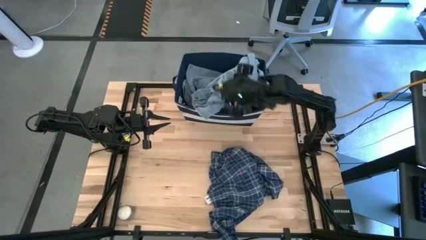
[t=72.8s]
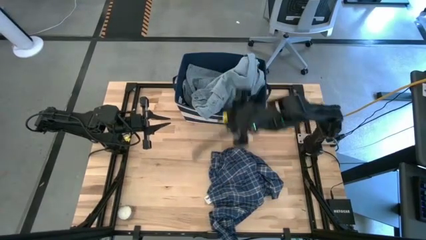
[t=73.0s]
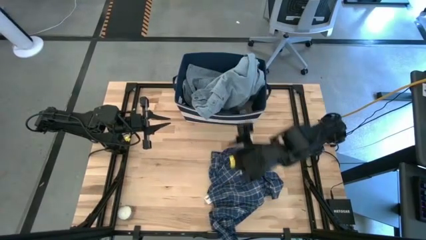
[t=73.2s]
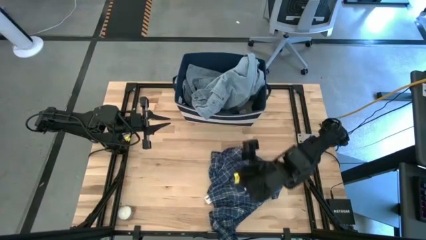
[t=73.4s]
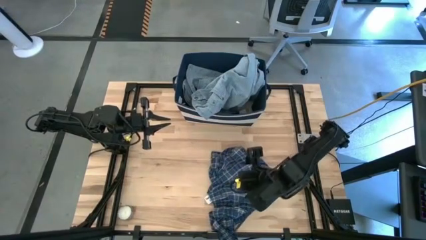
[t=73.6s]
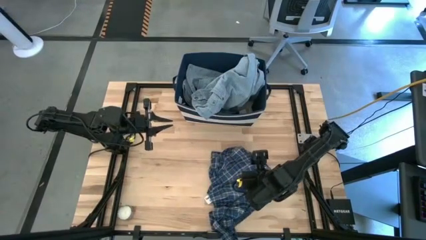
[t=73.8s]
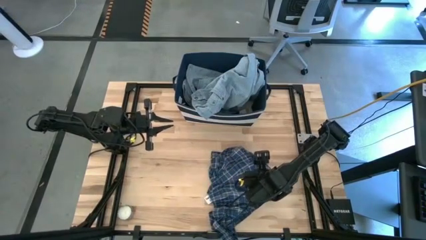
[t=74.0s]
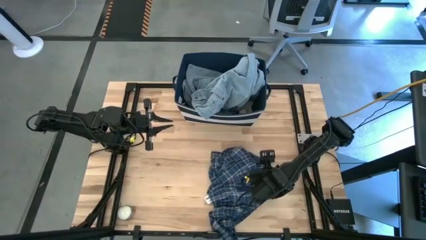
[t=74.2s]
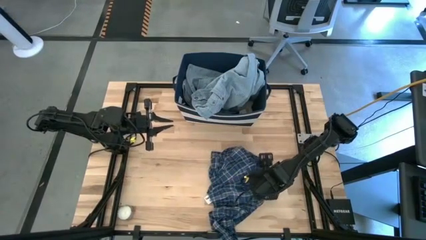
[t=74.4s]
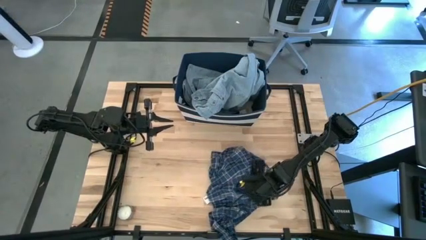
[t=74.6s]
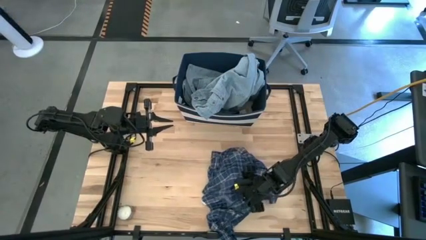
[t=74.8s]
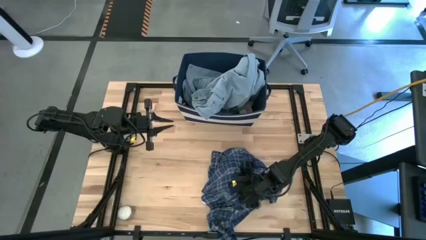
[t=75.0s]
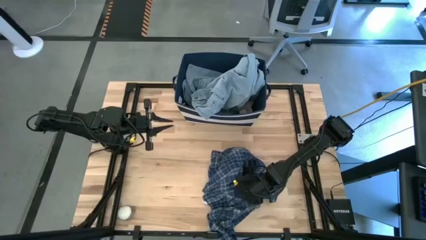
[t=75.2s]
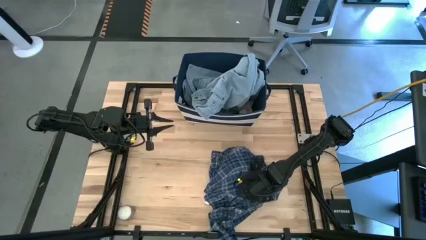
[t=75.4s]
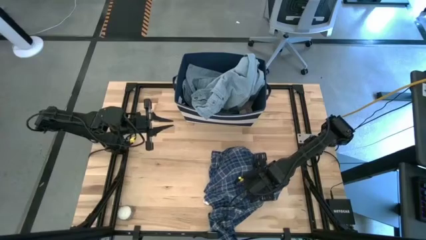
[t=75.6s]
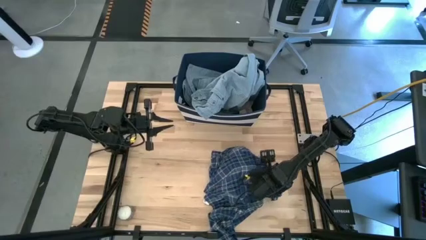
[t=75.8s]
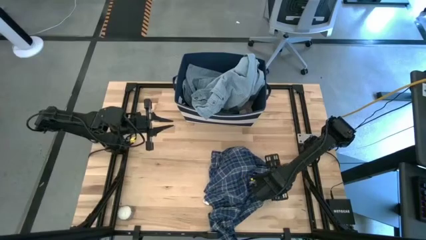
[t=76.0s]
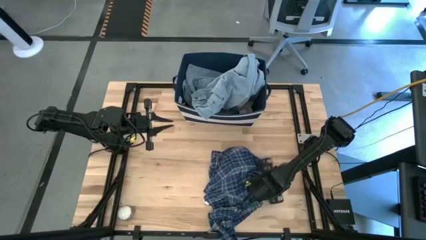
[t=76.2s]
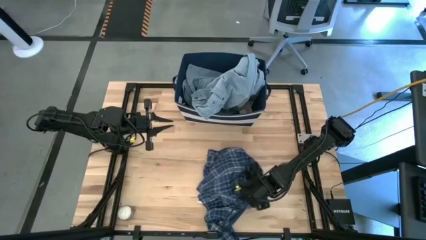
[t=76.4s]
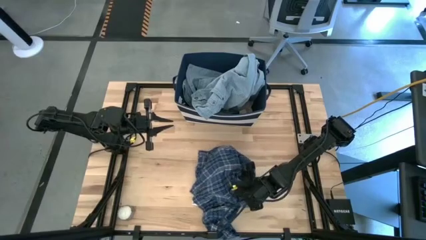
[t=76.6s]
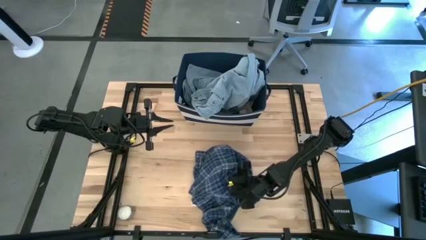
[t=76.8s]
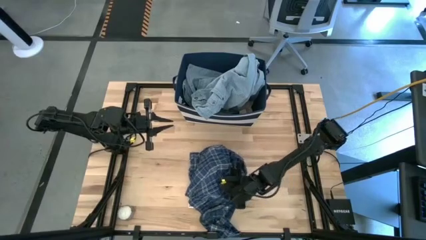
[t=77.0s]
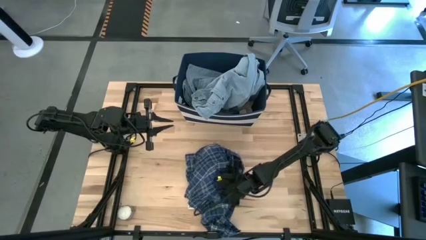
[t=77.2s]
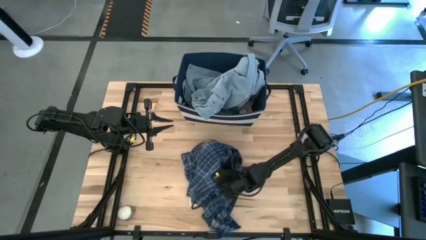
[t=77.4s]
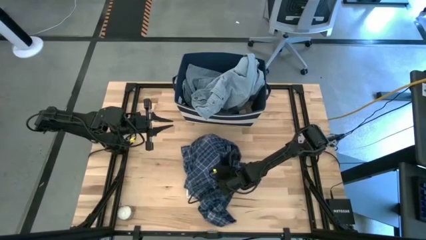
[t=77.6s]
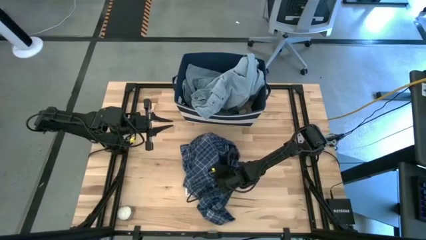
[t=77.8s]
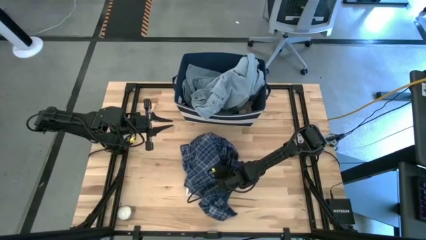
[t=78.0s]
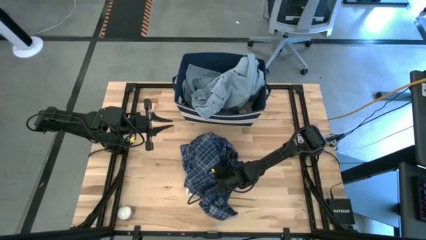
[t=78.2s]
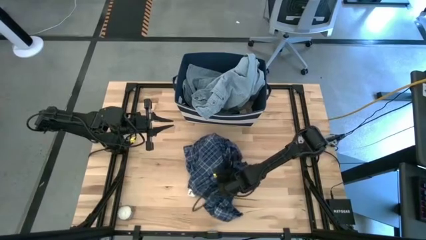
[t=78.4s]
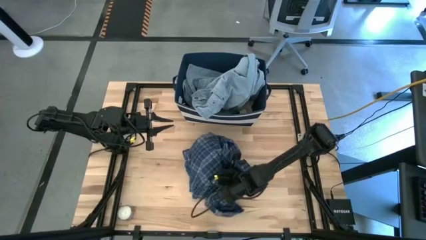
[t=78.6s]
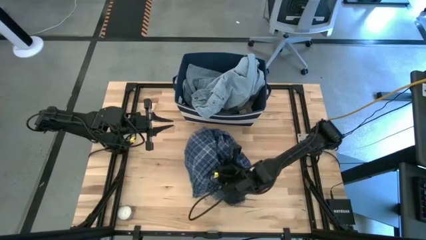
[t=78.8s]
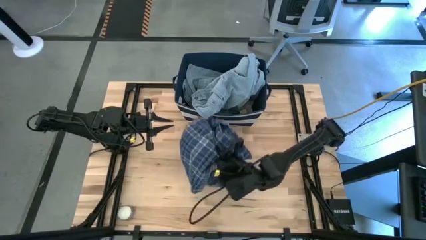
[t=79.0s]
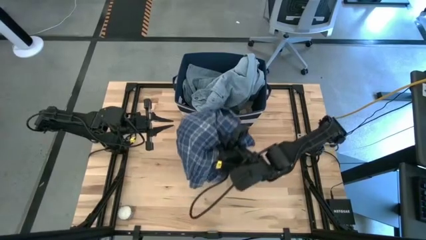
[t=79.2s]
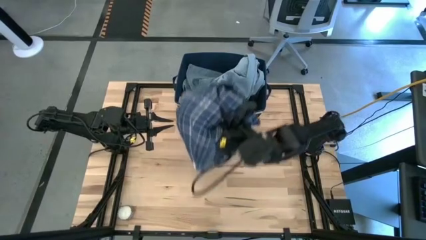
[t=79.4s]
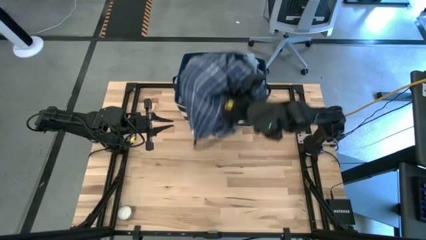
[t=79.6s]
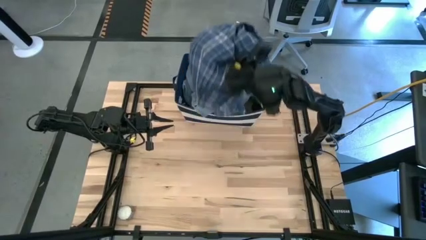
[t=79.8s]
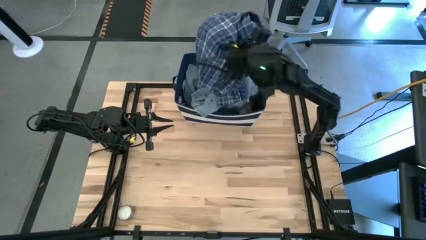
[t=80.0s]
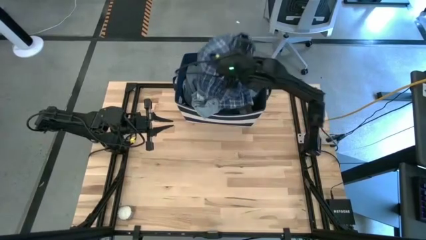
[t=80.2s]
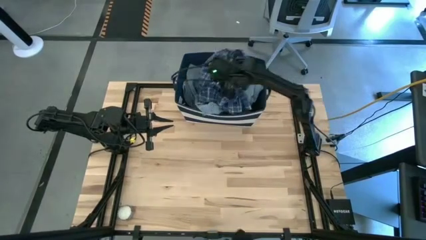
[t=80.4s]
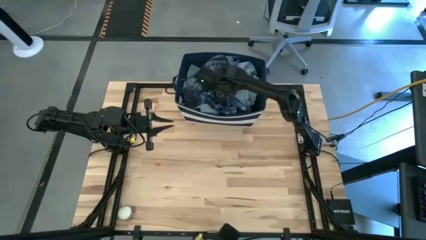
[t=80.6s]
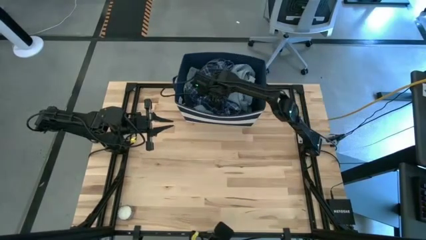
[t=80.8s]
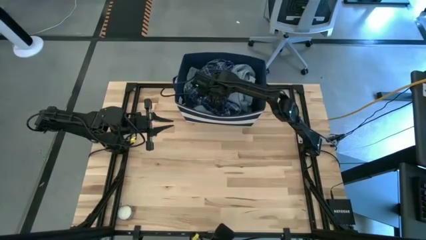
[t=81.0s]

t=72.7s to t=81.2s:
Task: Sort clothes
Put the blue plaid shirt into the blue bin

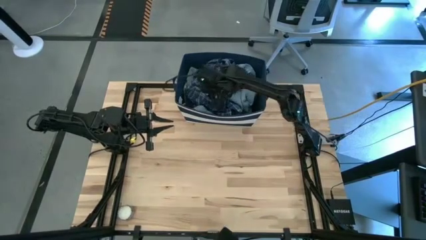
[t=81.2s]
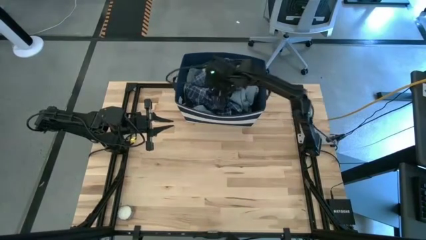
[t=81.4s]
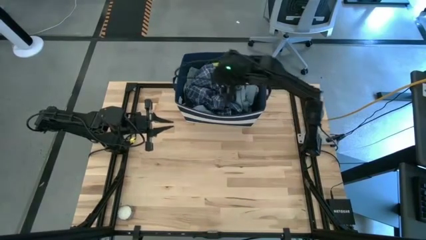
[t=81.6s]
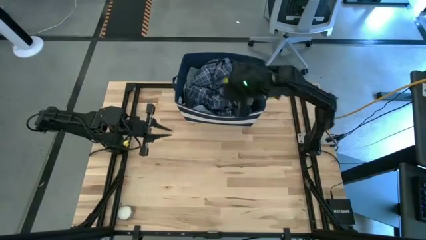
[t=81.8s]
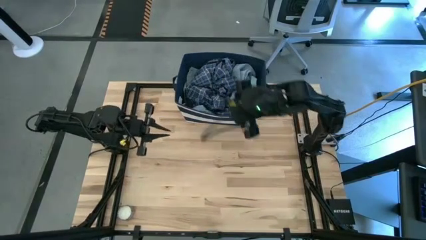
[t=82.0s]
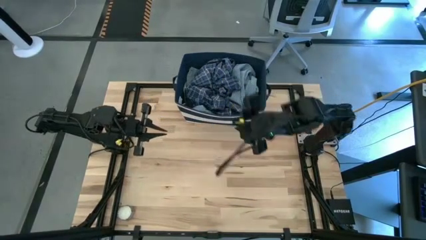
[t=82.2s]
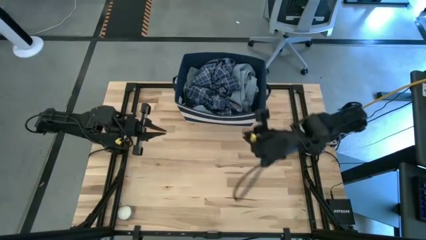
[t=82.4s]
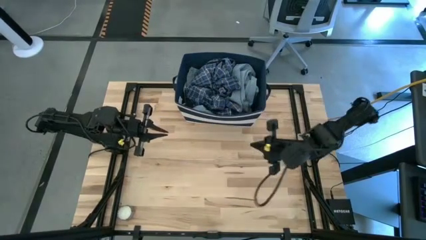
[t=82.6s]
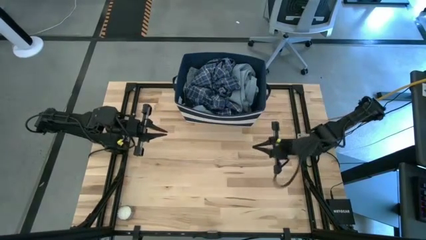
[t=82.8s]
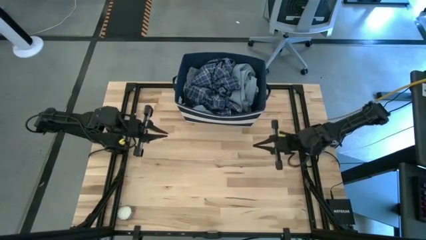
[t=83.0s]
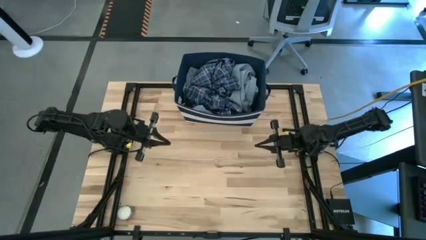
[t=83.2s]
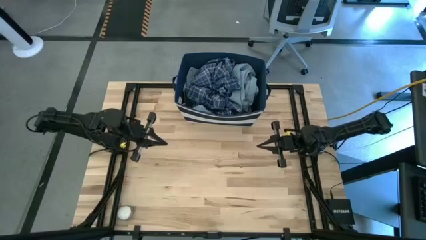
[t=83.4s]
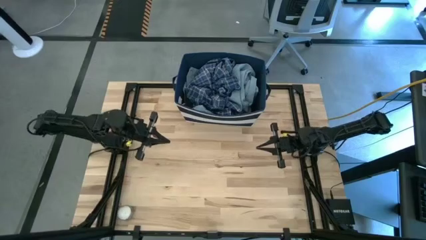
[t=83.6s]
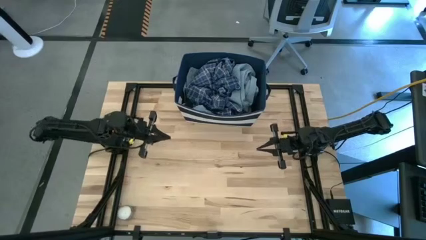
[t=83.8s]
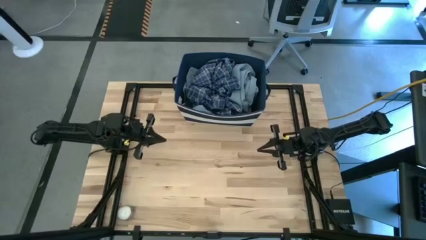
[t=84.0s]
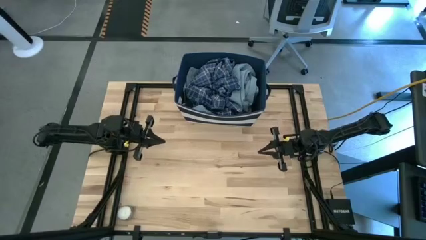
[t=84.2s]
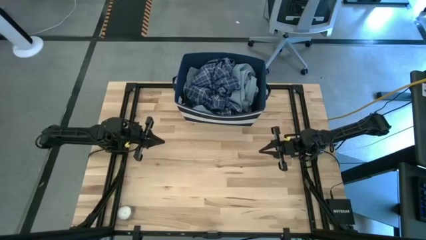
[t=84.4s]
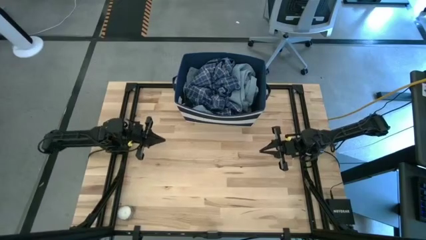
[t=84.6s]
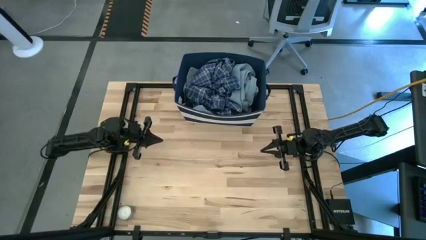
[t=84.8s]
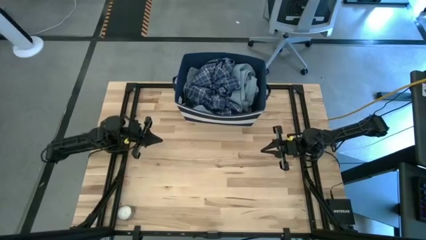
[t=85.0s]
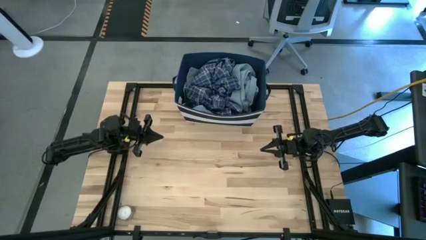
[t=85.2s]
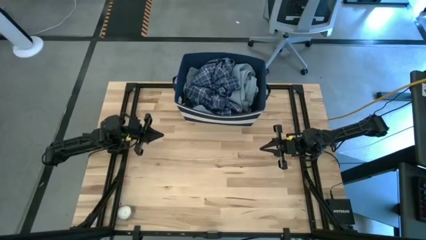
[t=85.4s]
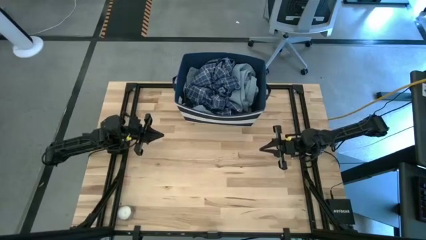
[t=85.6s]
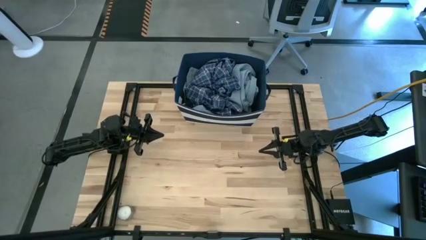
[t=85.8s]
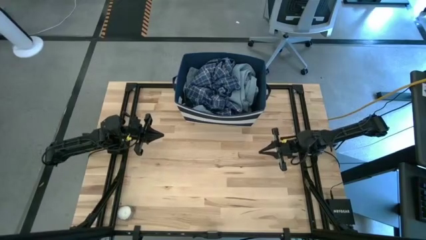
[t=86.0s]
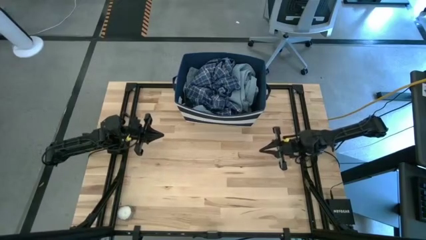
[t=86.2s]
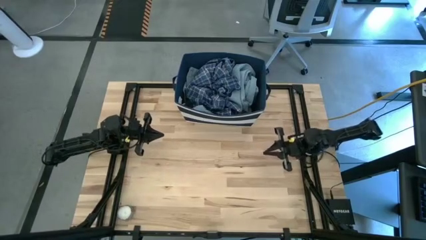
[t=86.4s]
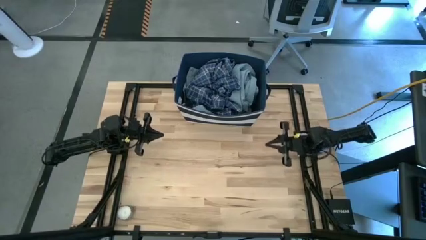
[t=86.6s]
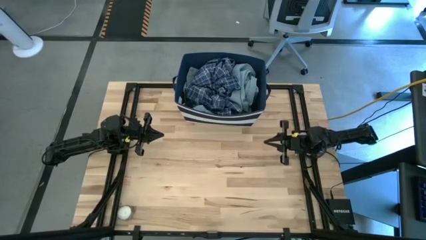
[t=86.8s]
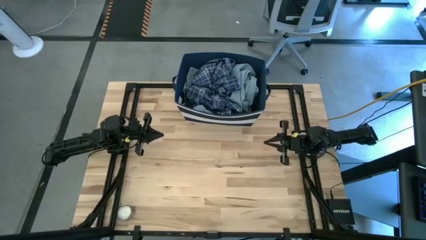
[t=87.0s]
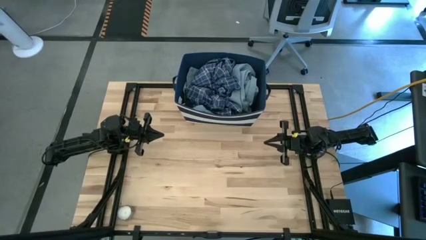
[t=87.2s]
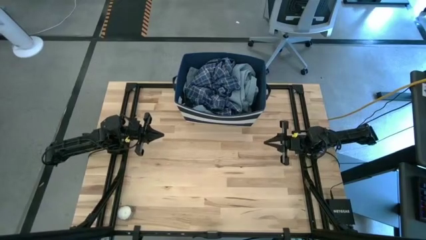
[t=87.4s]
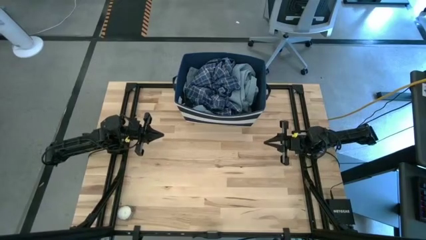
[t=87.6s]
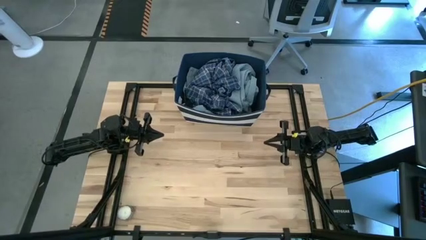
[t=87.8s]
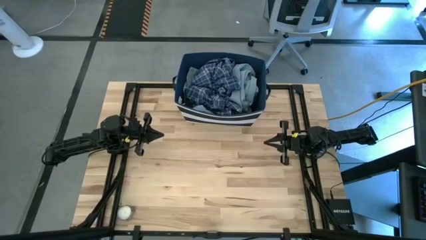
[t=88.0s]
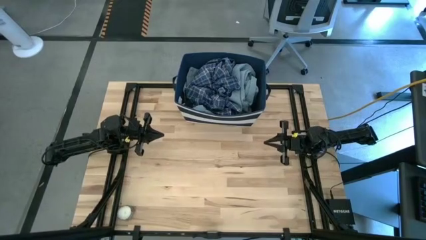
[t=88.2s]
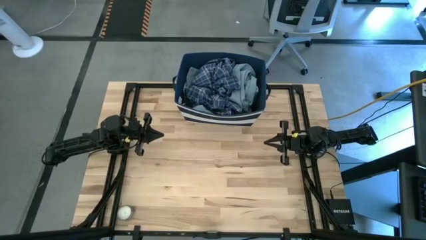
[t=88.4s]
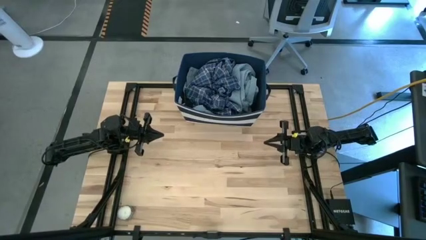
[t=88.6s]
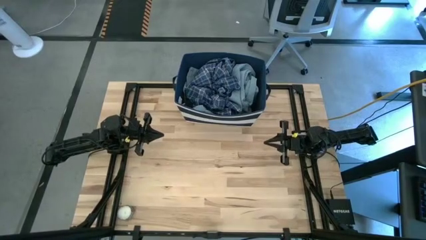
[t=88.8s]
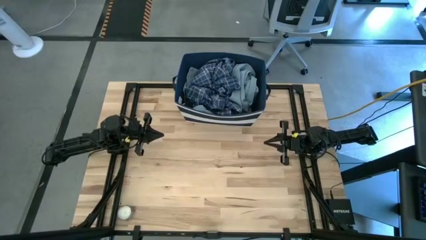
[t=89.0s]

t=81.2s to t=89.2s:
Return to Home Position
